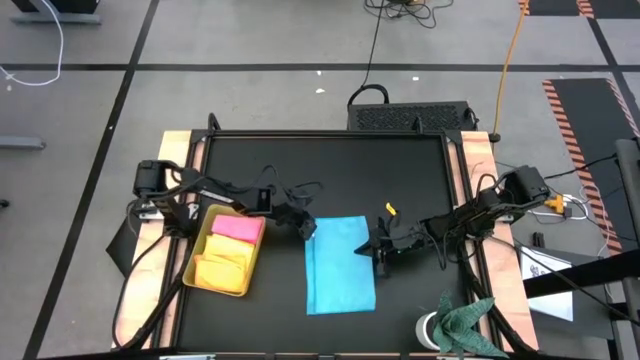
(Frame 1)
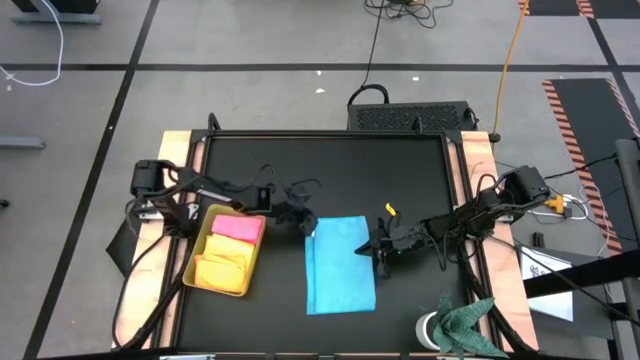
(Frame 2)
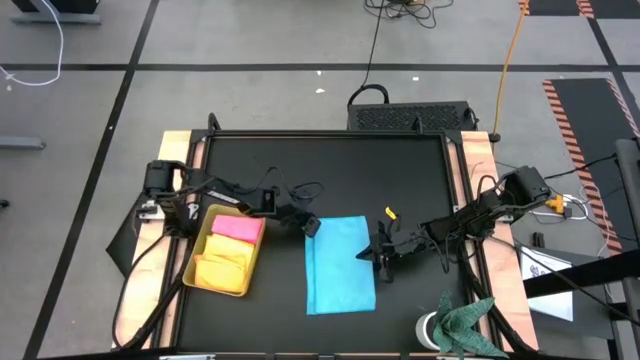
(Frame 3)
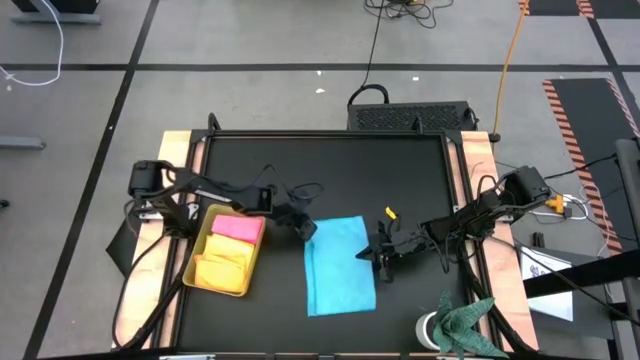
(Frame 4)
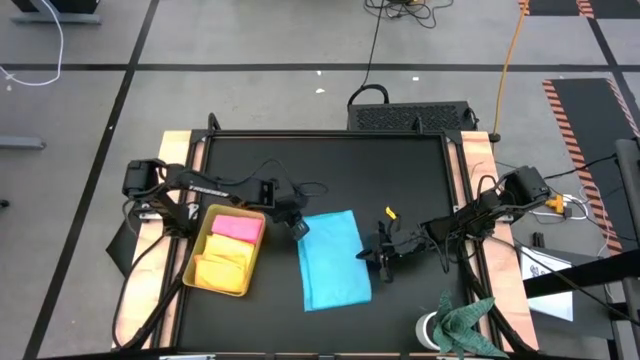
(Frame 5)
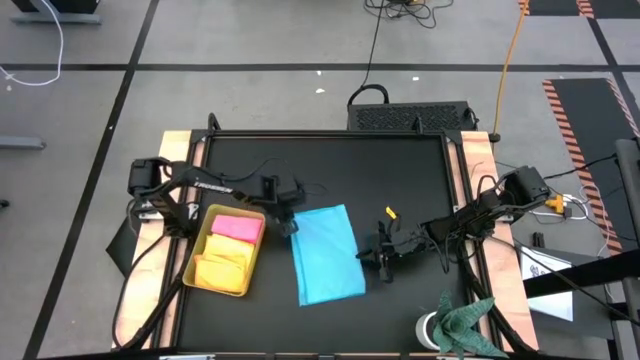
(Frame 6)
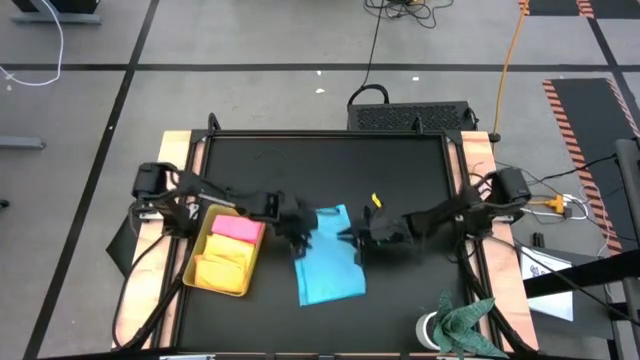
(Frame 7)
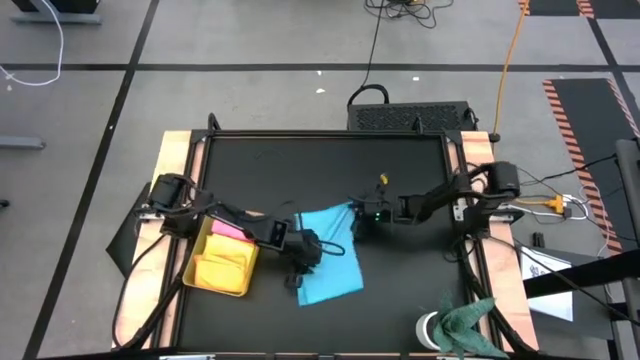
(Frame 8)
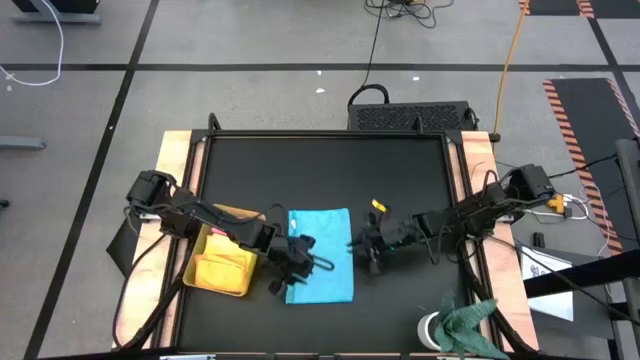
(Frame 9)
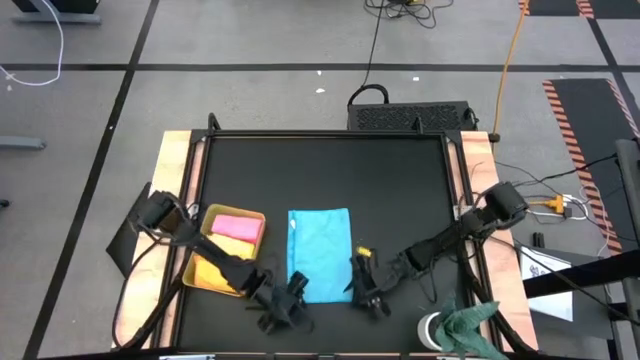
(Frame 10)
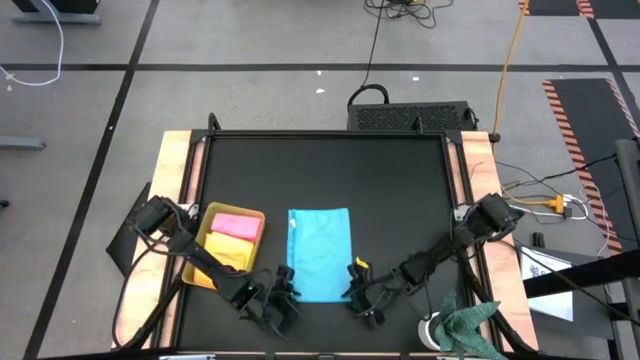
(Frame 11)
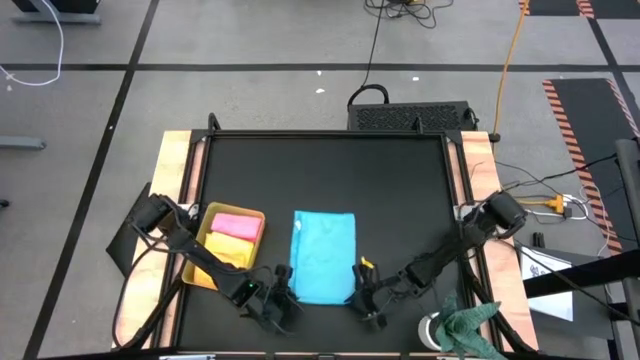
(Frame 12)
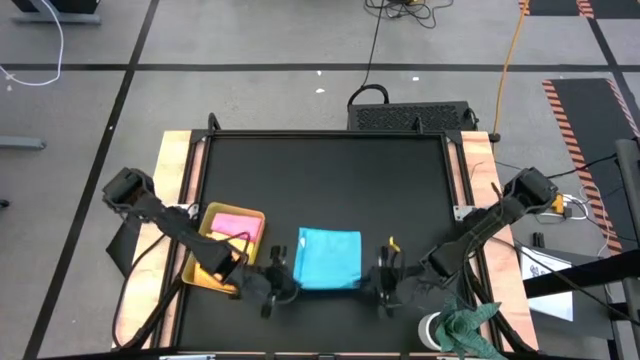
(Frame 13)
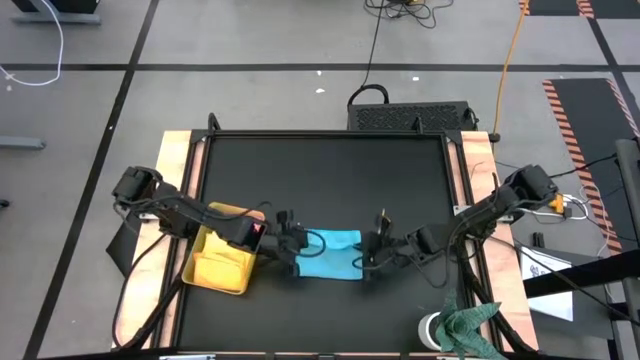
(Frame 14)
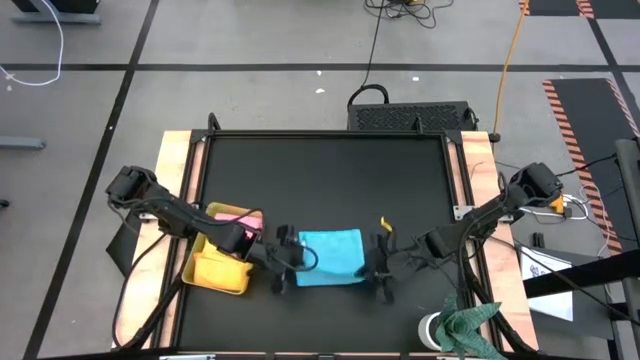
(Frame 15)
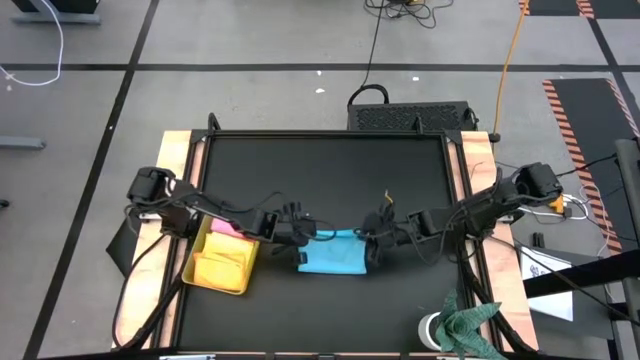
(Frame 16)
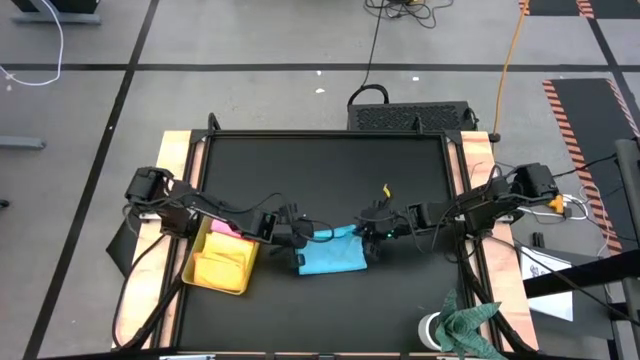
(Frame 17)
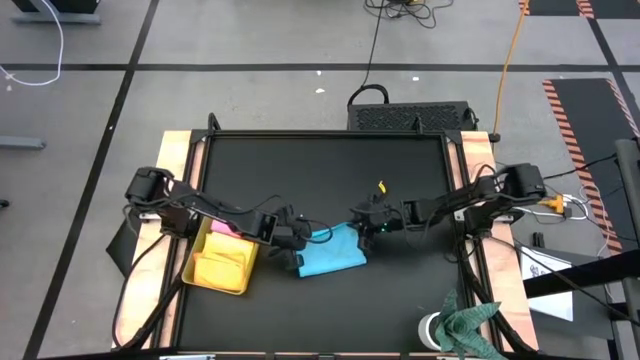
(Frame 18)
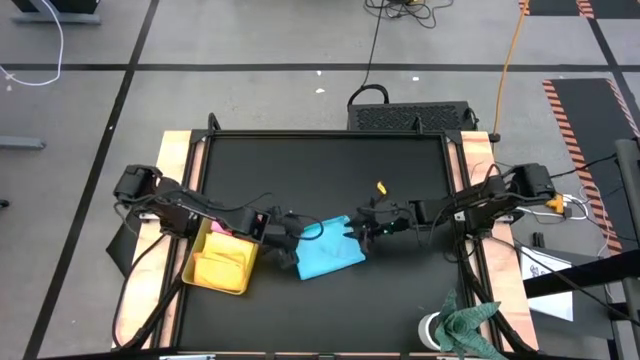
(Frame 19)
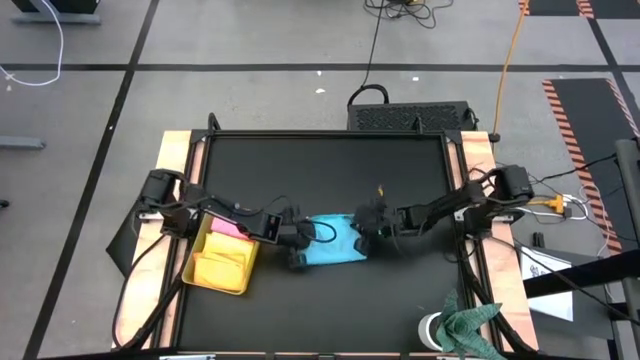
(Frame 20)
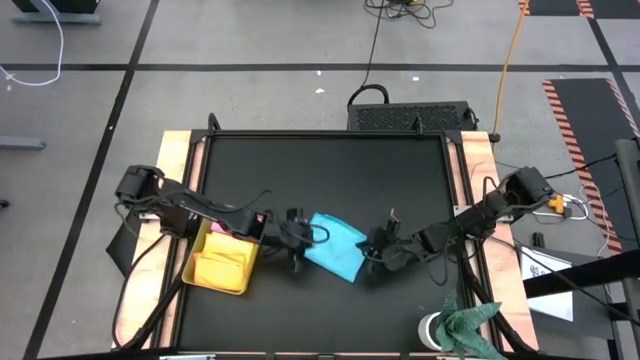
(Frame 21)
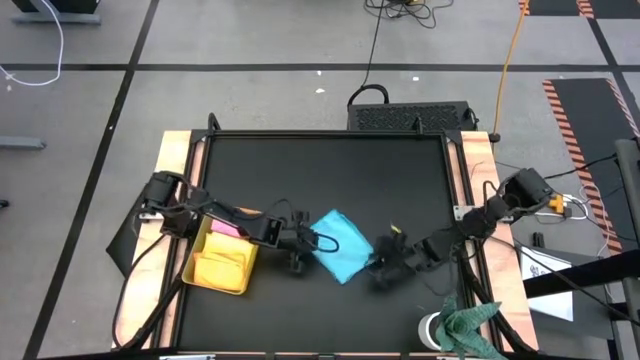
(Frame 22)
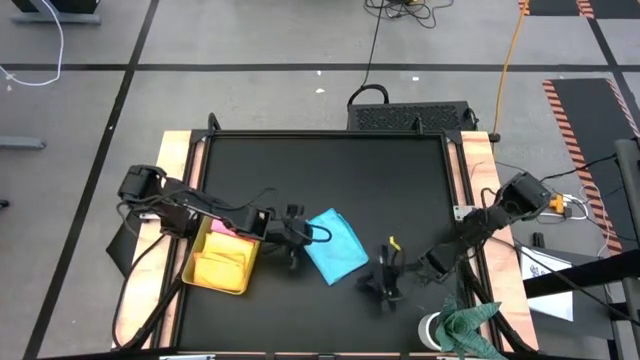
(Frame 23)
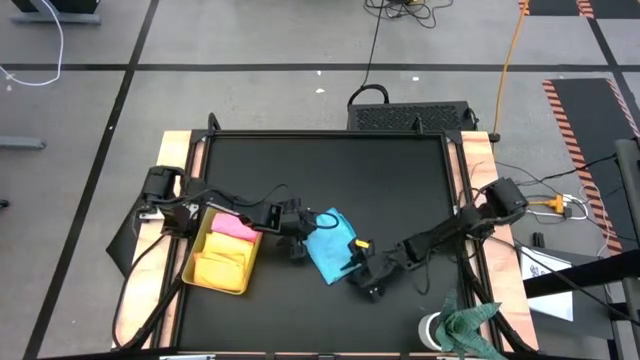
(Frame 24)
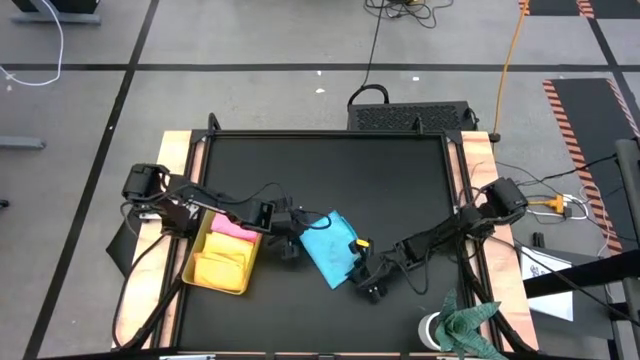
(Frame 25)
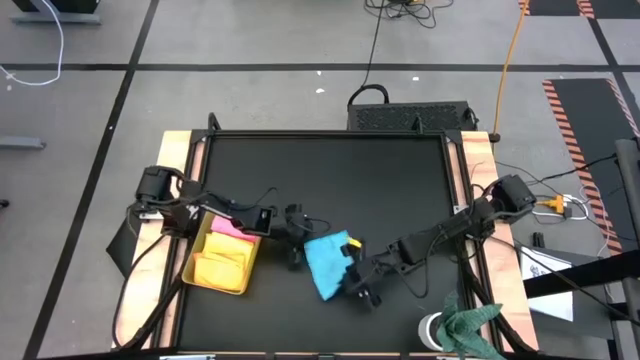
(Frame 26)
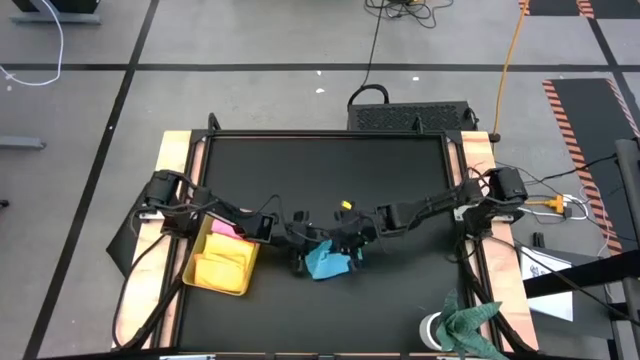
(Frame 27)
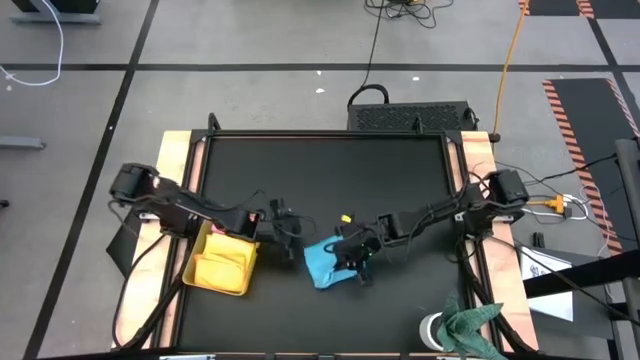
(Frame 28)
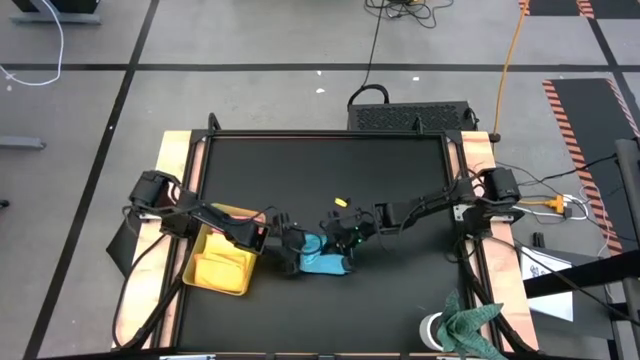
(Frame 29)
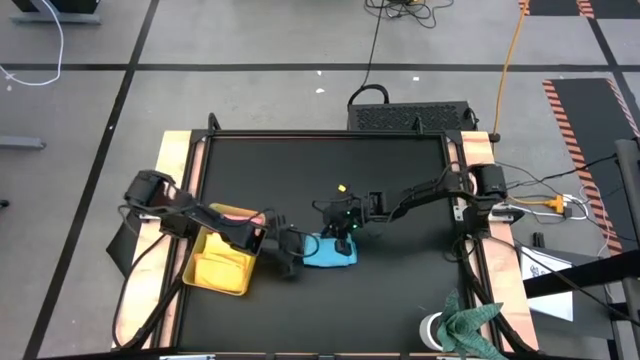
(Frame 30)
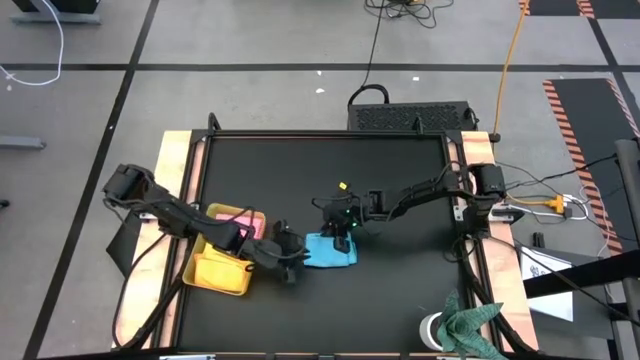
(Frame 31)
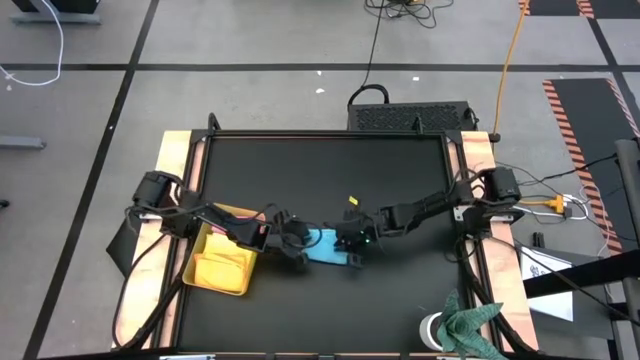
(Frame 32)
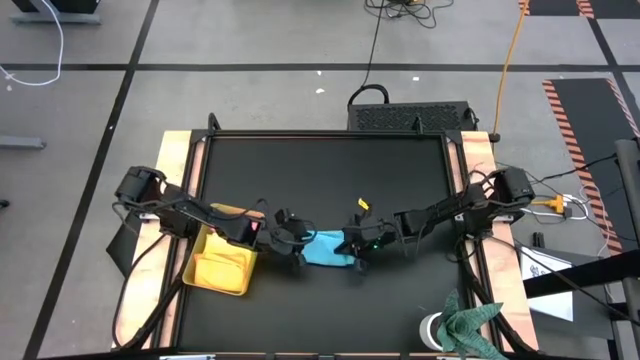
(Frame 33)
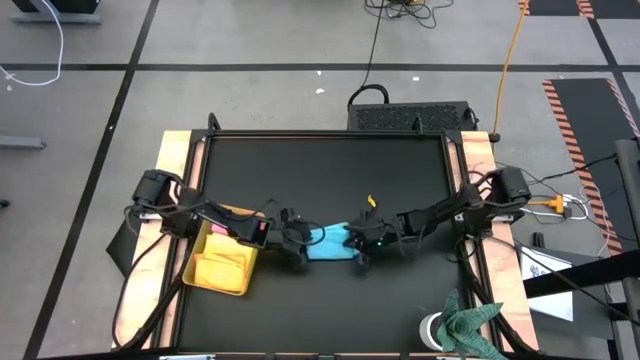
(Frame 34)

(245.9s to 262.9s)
Task: Fold microfiber towels
Fold the blue microfiber towel

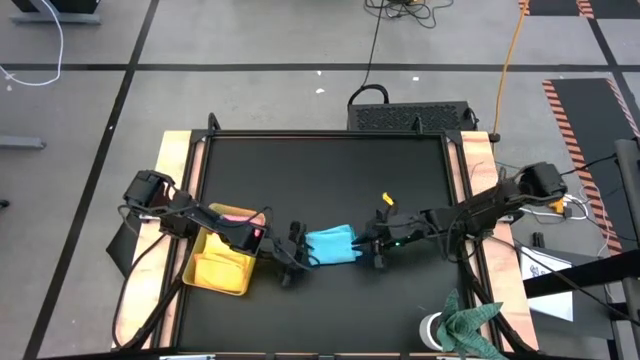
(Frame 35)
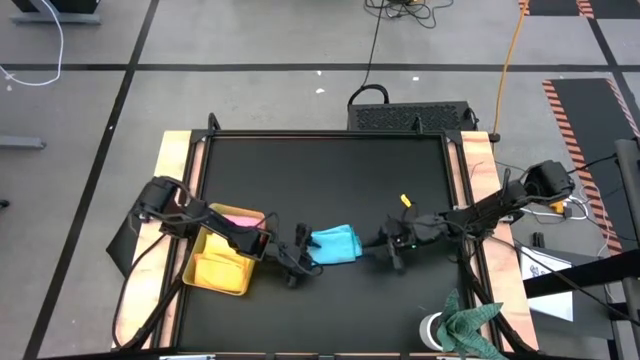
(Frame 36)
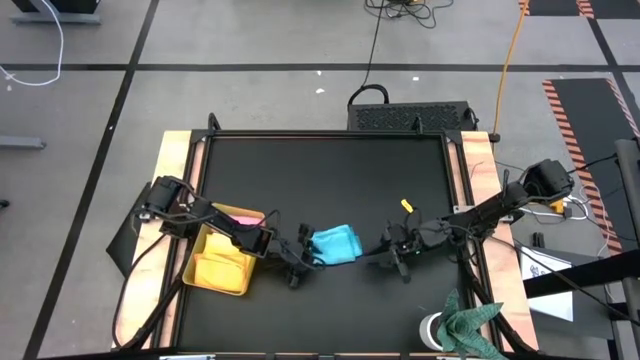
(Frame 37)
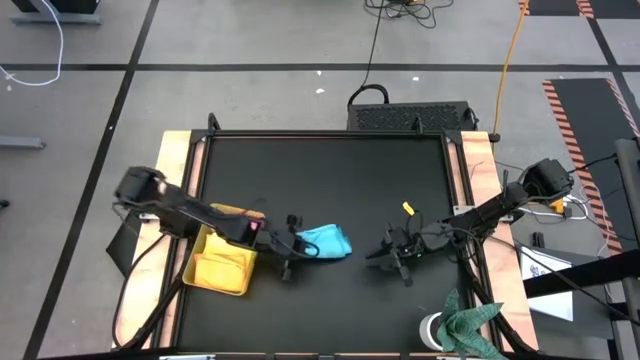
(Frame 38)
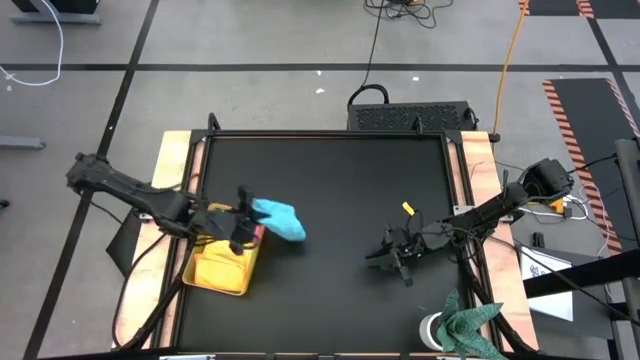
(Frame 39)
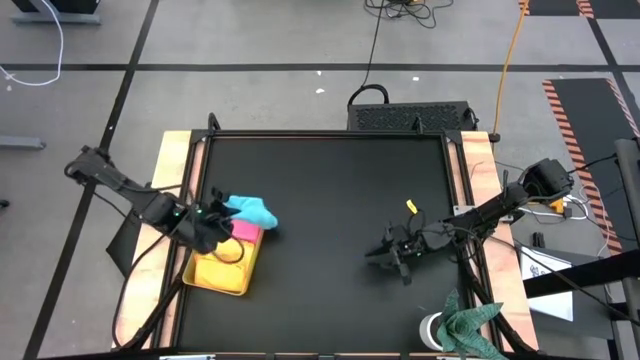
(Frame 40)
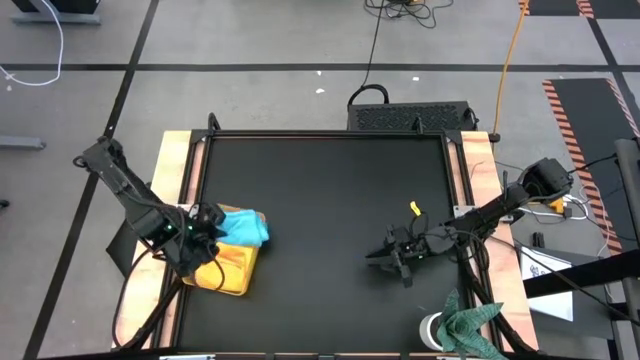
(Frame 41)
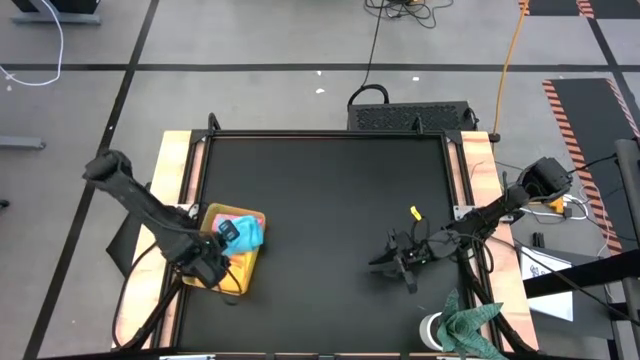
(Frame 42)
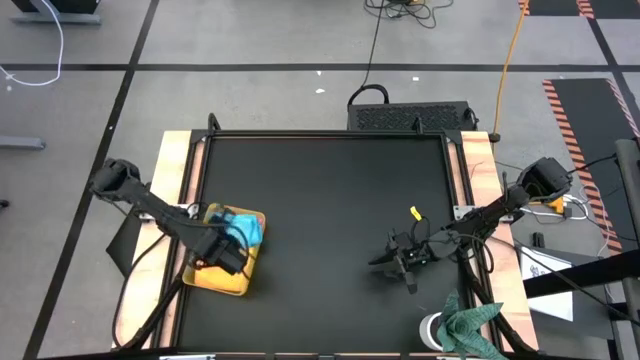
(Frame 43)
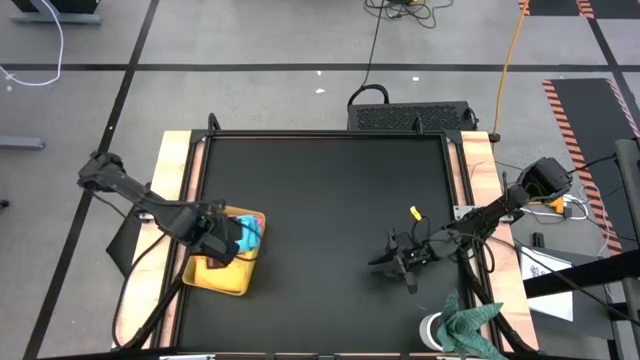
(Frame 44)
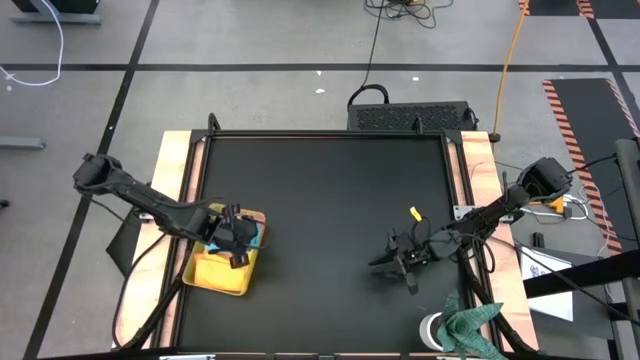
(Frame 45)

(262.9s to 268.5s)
Put the blue microfiber towel into the yellow bin
